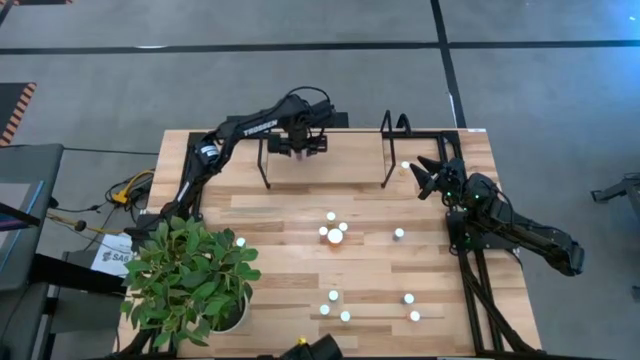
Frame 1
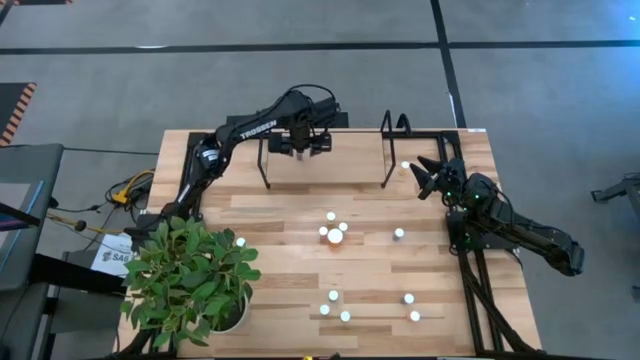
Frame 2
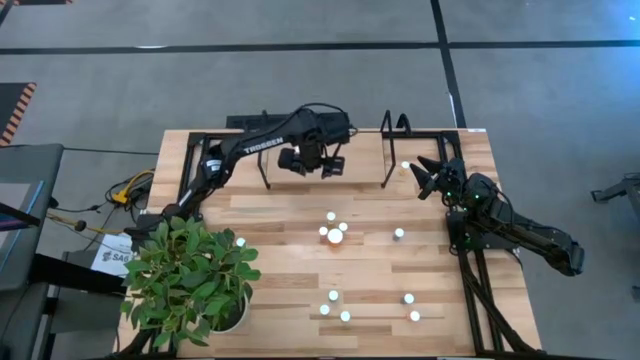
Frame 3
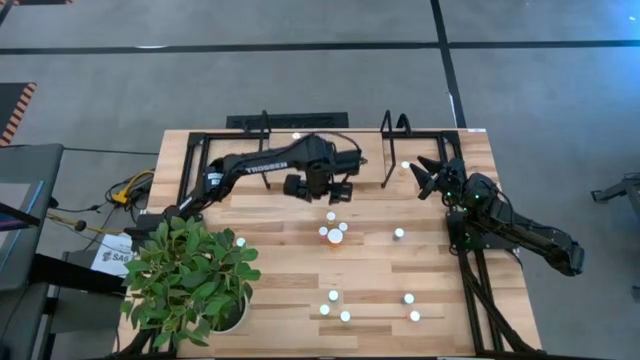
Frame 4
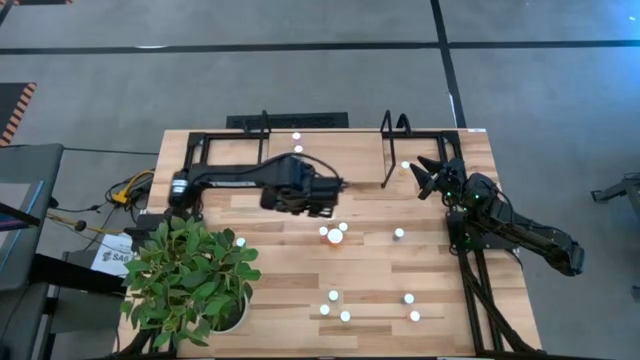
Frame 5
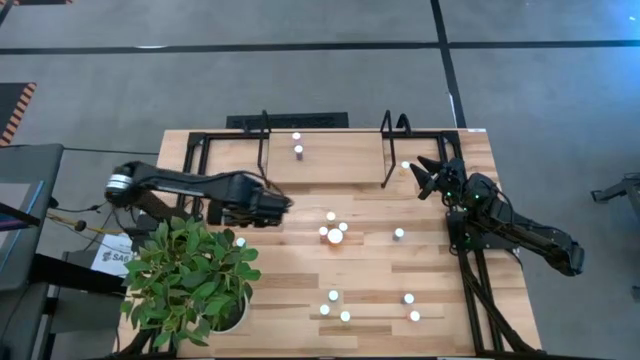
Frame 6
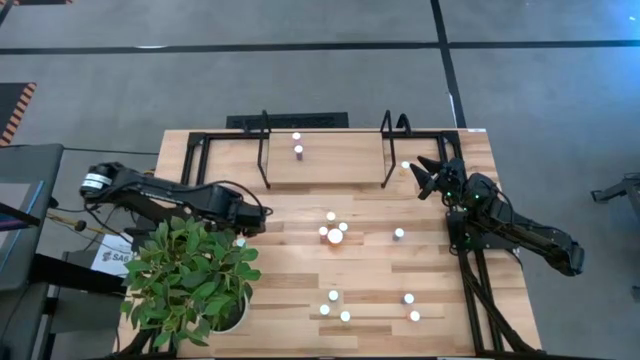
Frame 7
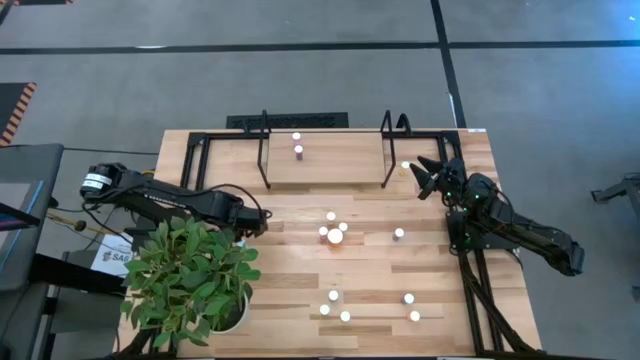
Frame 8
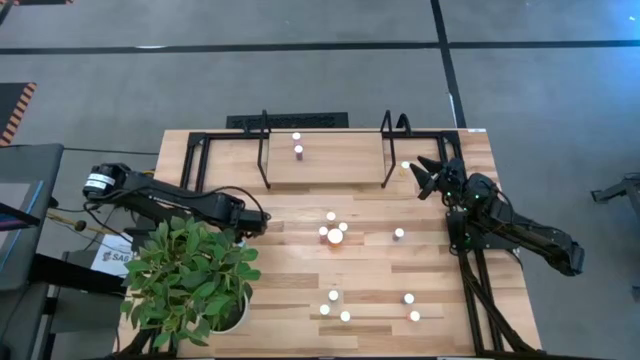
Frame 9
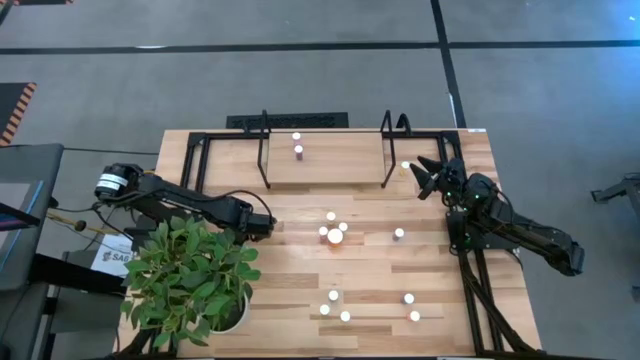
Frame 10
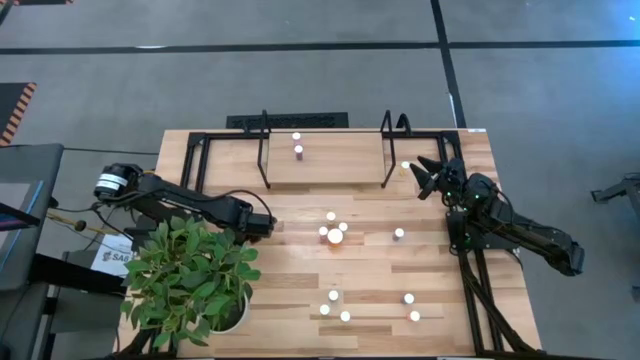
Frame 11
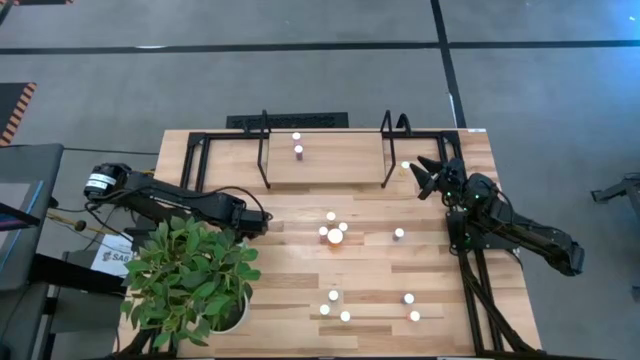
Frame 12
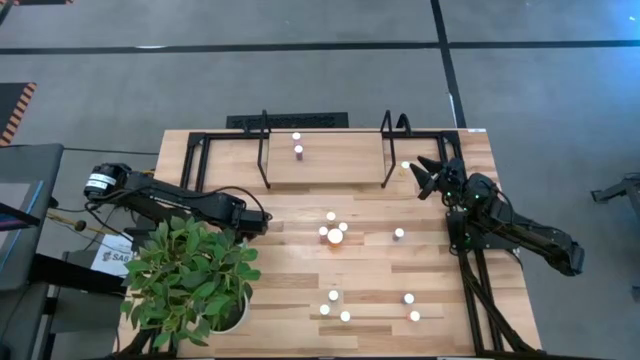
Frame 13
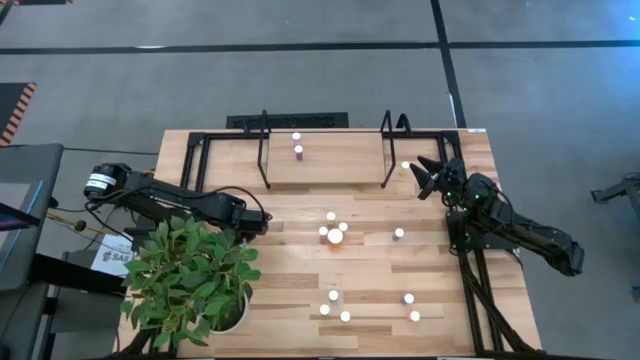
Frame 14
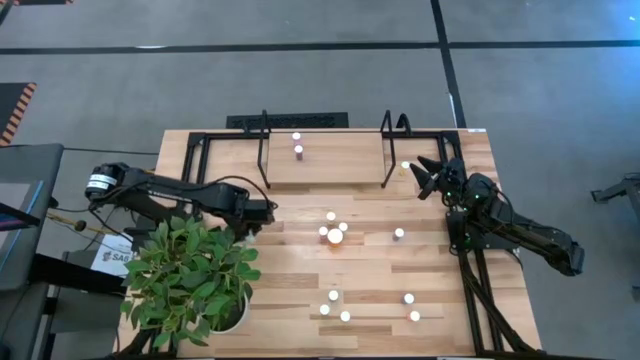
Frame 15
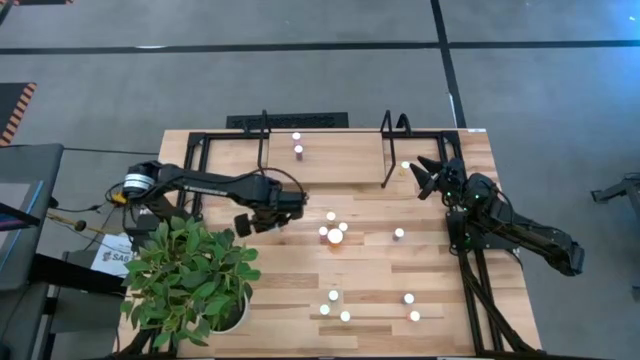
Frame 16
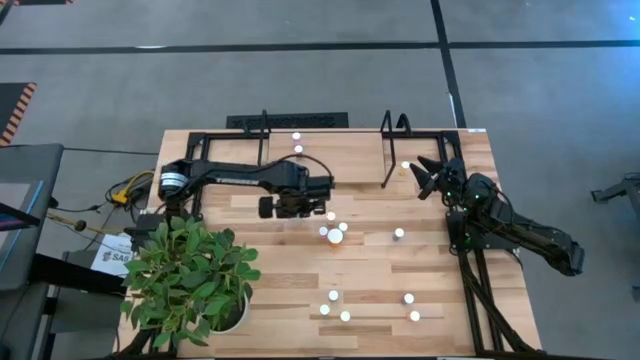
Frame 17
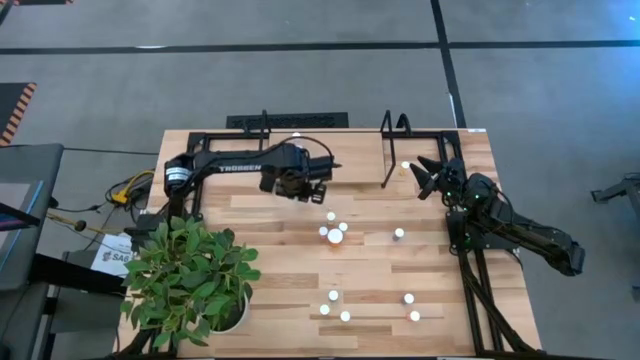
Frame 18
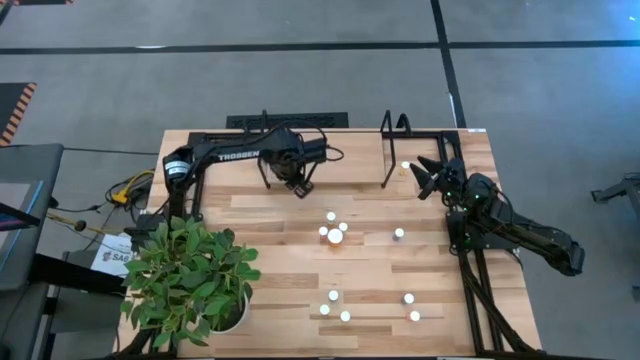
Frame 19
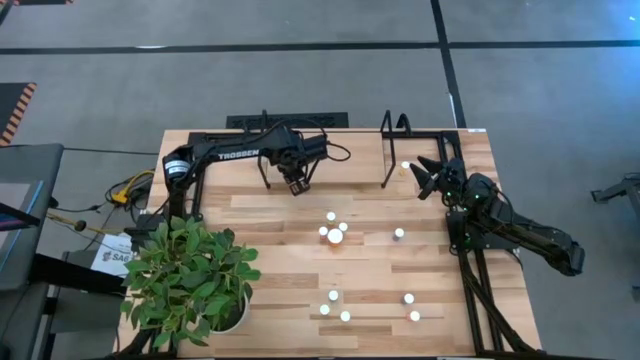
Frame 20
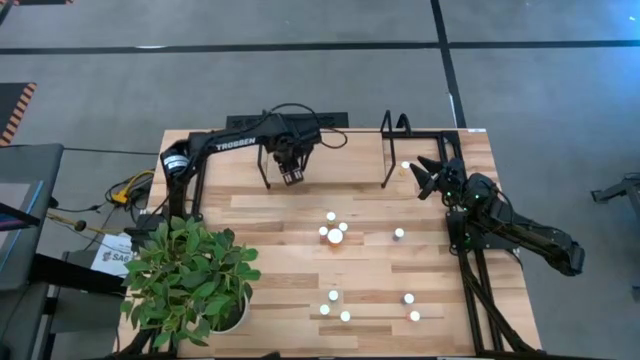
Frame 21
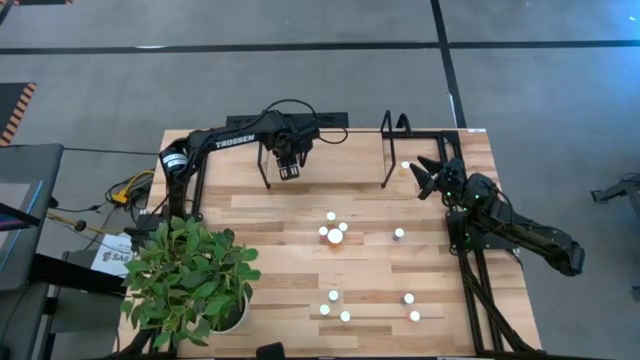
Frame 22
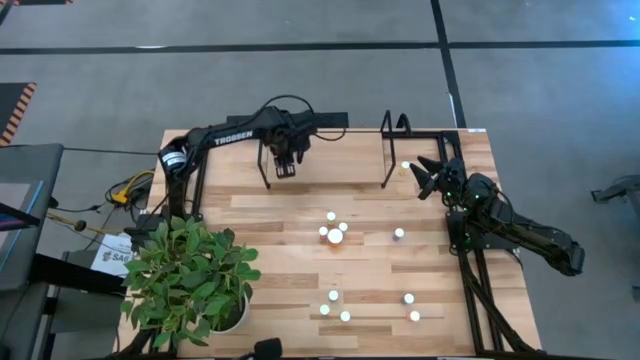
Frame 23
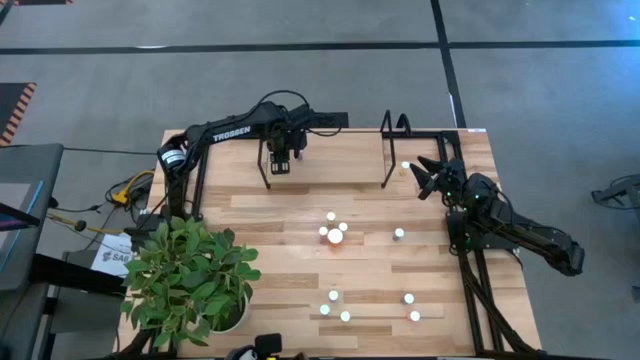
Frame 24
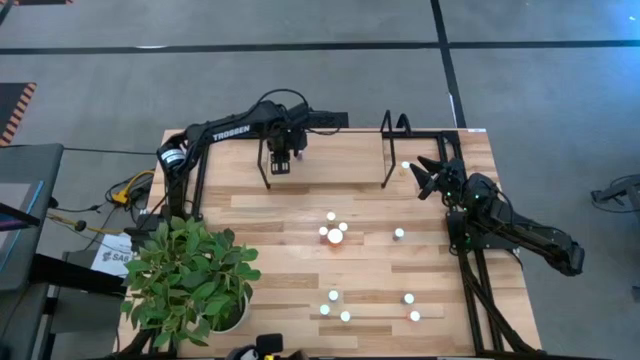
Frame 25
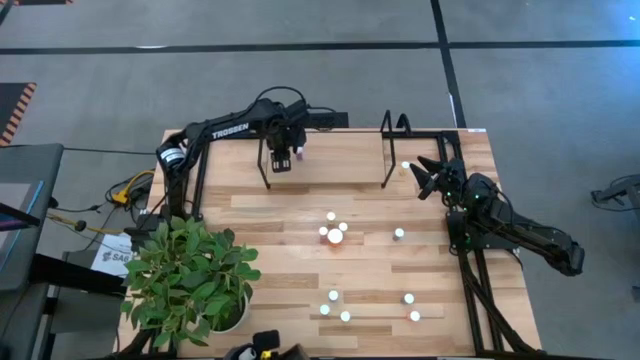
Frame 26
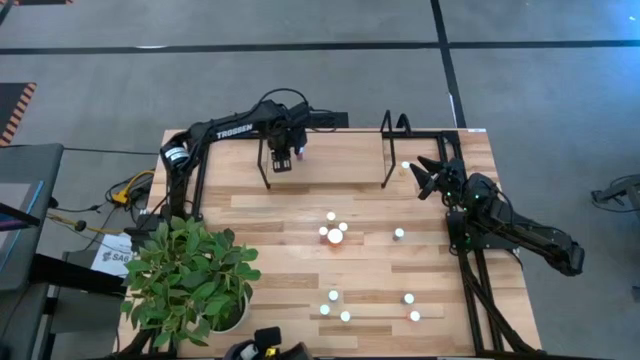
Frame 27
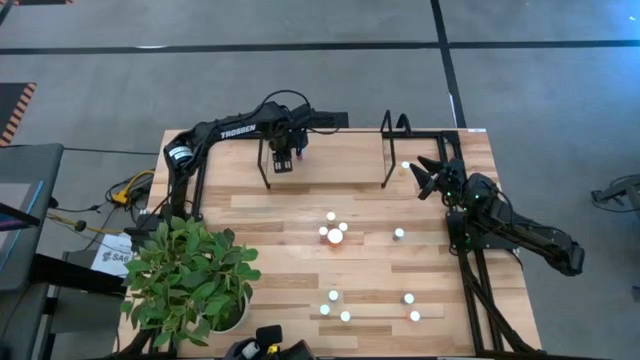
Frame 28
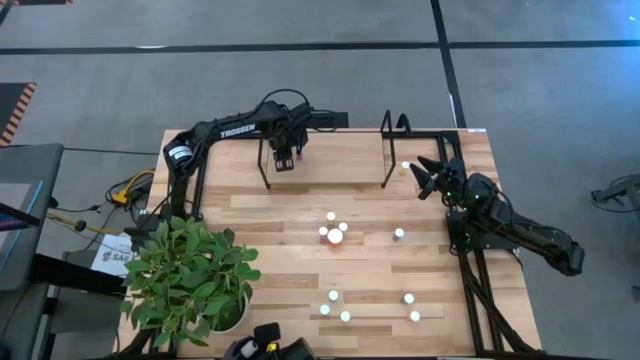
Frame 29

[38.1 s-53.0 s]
Task: Pick and place medicine bottles onto shelf by color
Put the green pill bottle on the shelf

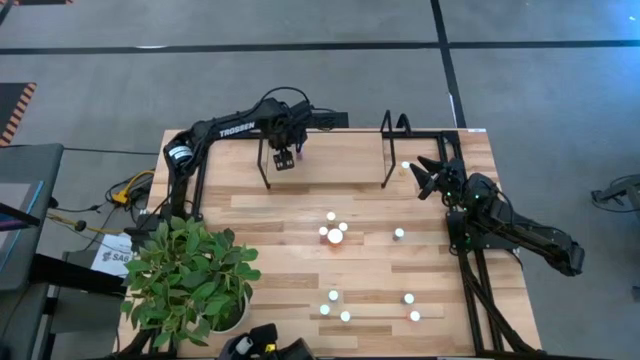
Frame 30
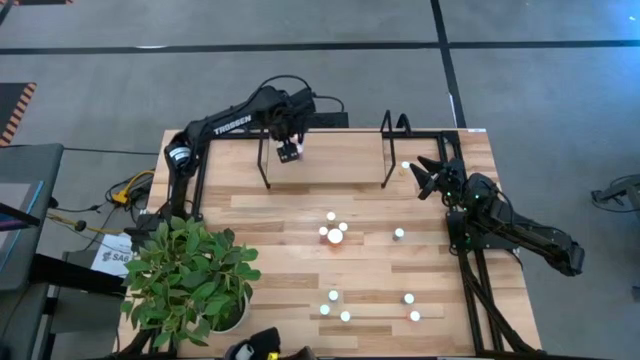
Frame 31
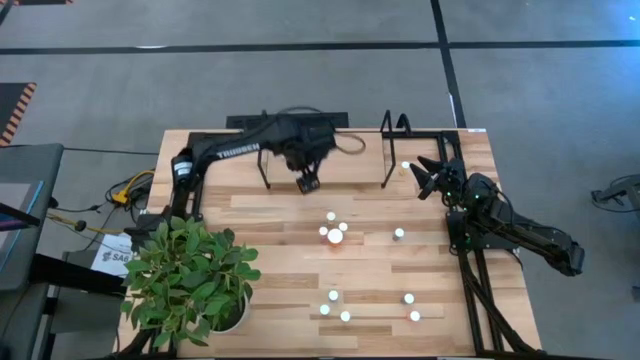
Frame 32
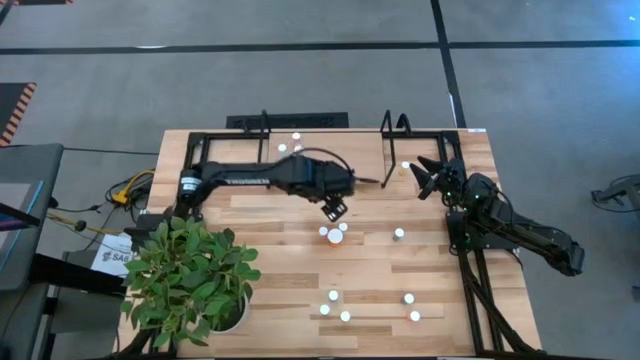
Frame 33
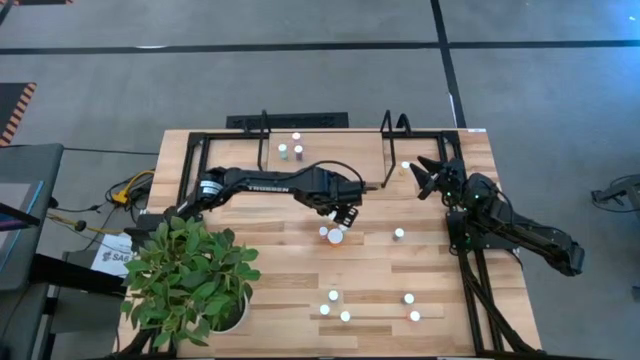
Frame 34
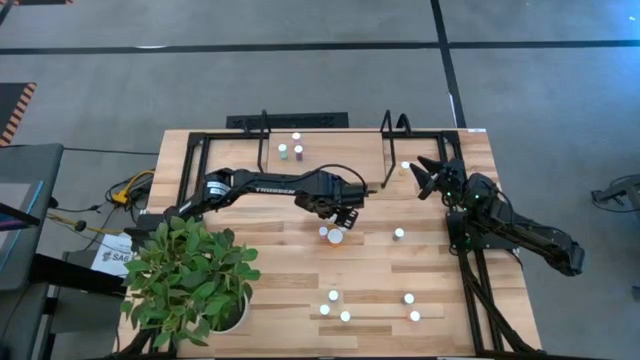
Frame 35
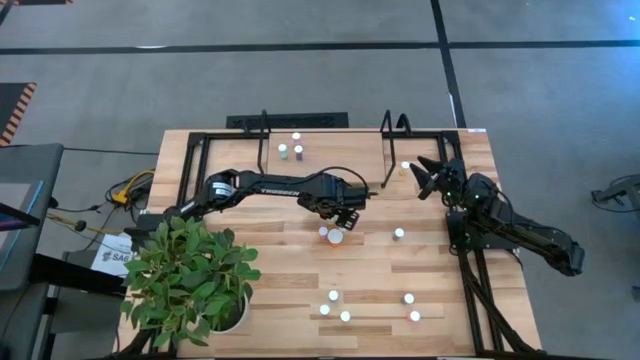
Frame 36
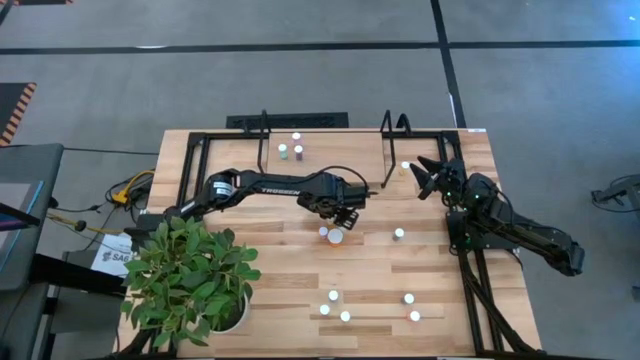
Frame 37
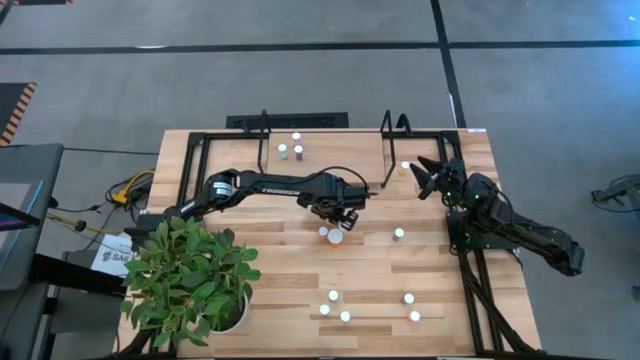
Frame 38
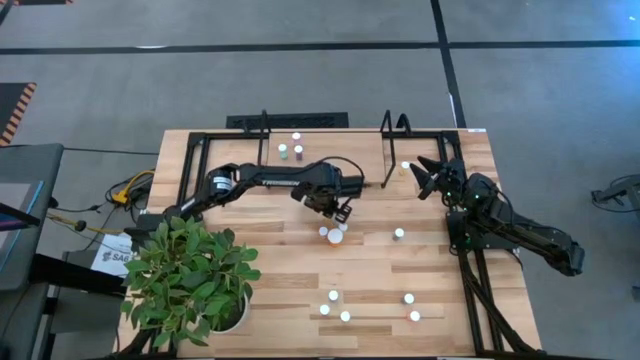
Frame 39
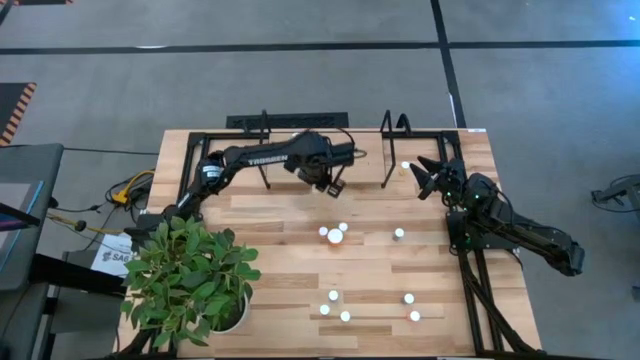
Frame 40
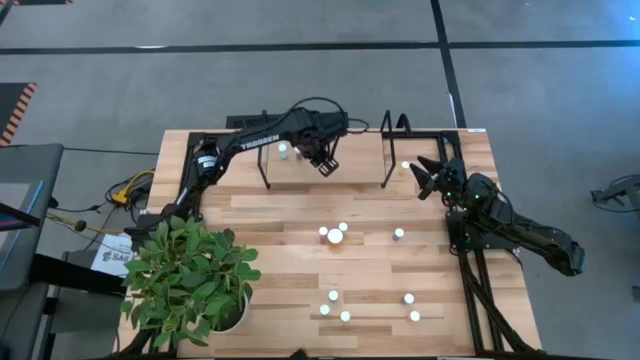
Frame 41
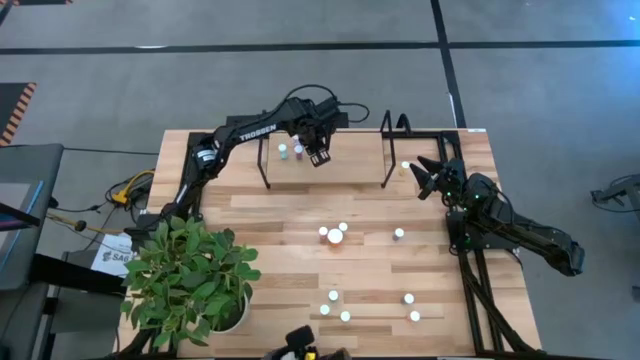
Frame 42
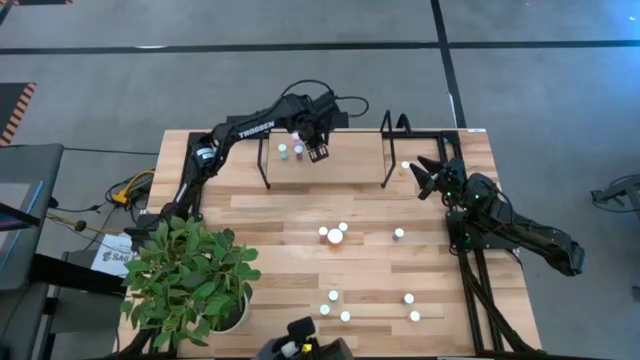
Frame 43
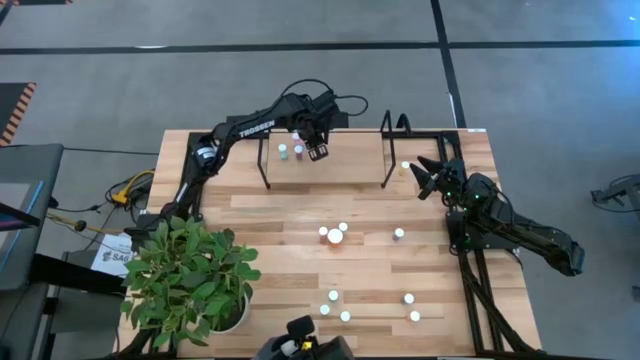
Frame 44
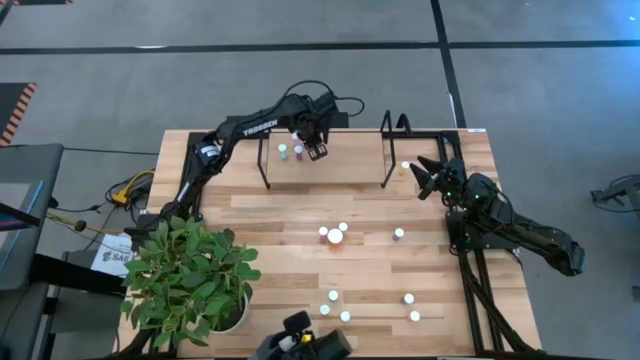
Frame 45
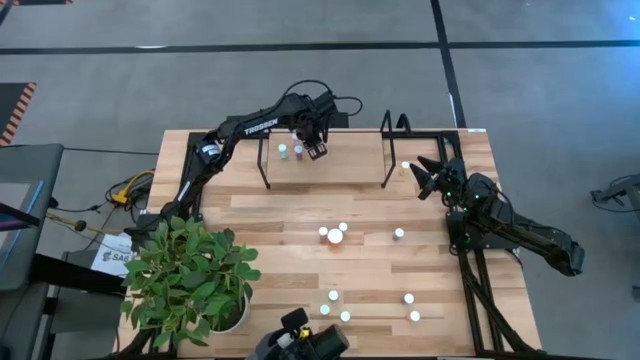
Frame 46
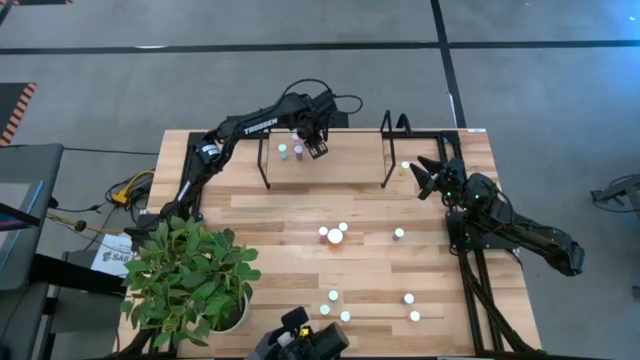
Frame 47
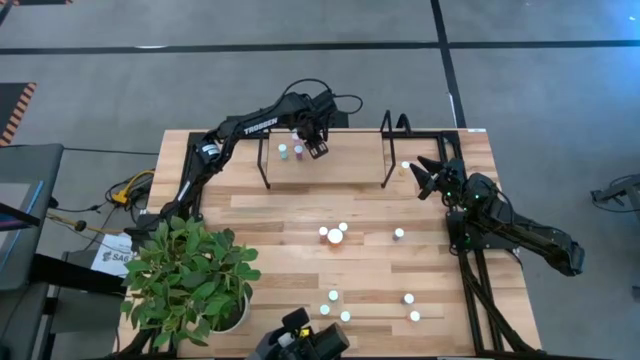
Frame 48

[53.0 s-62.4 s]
Put the yellow pill bottle on the shelf
